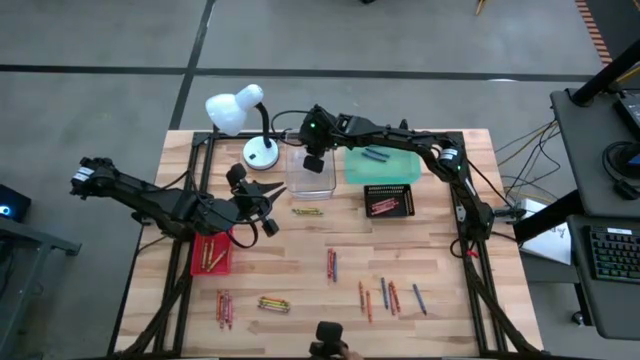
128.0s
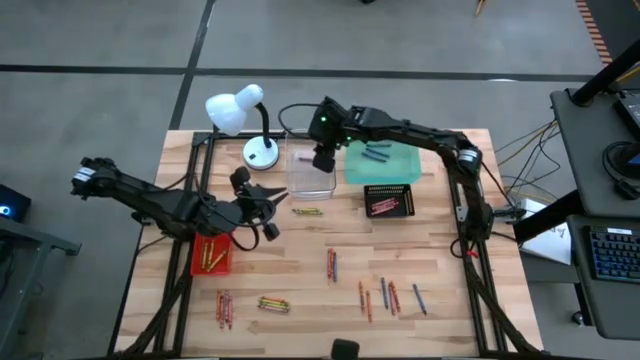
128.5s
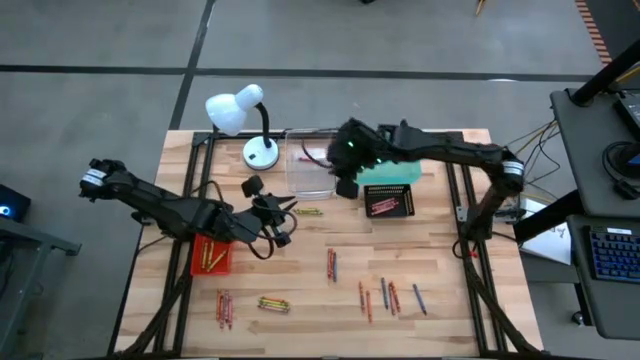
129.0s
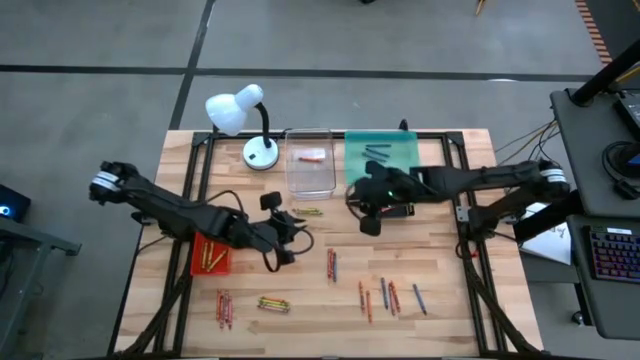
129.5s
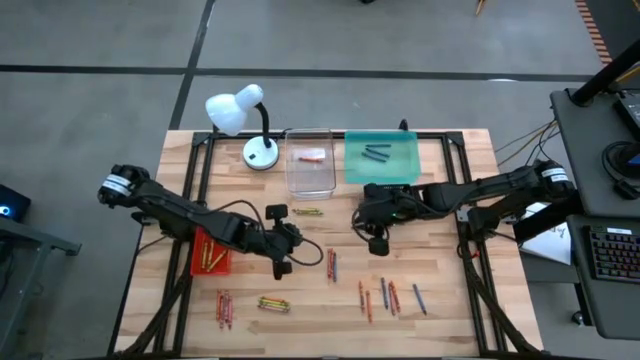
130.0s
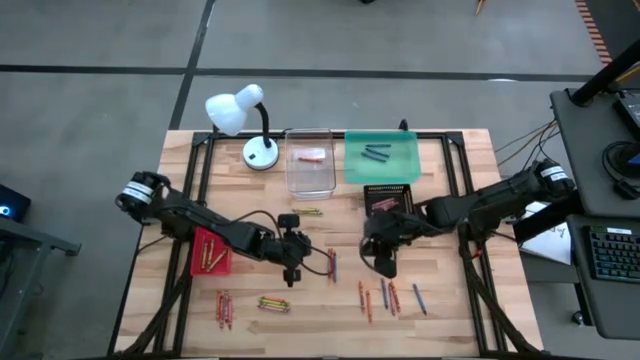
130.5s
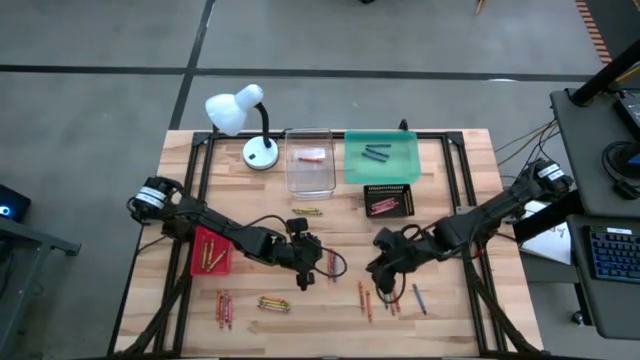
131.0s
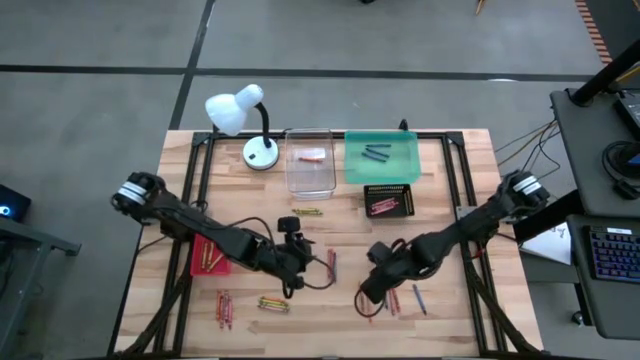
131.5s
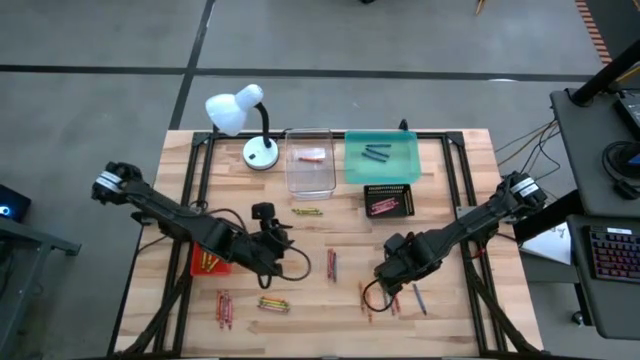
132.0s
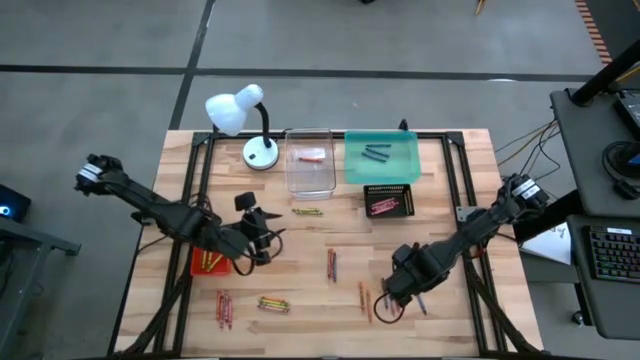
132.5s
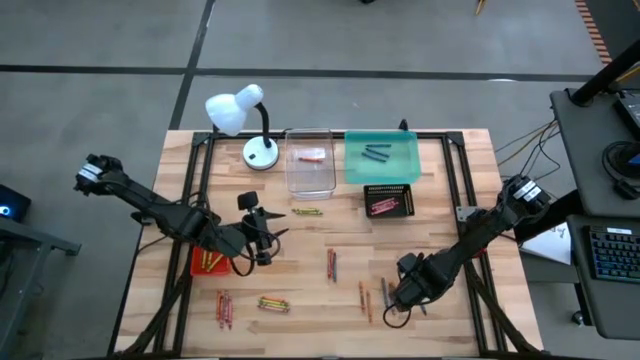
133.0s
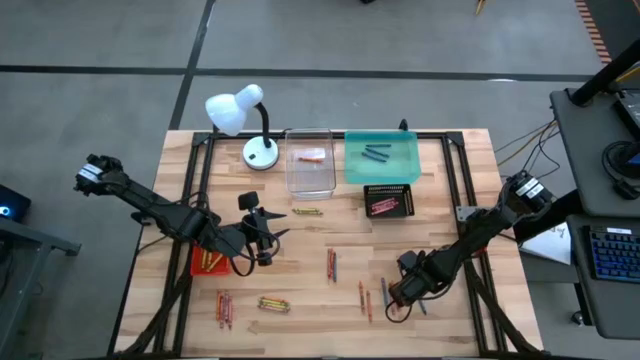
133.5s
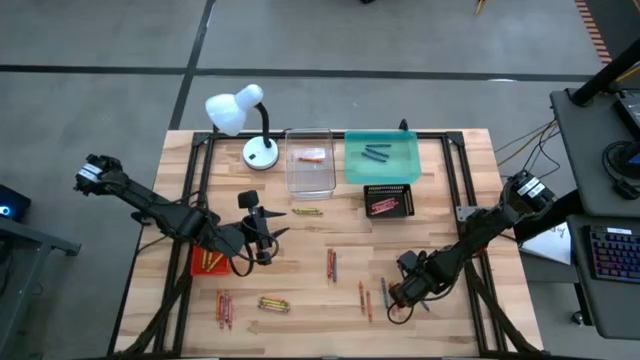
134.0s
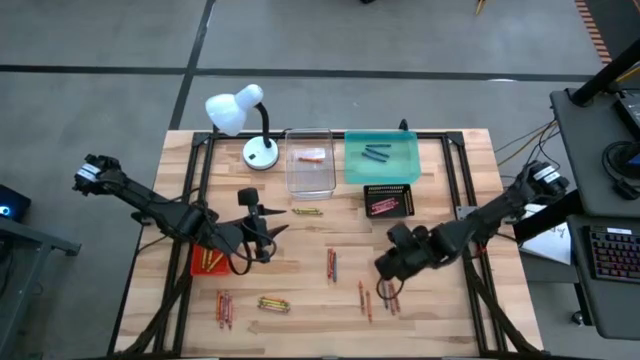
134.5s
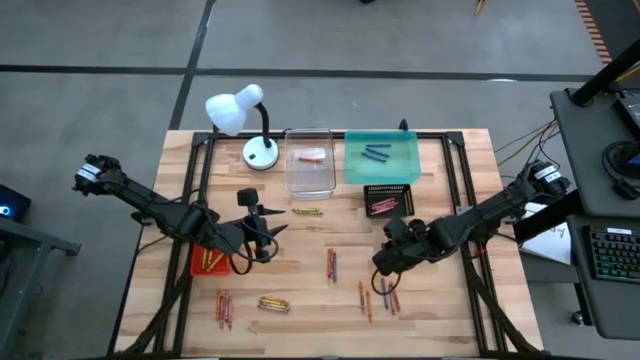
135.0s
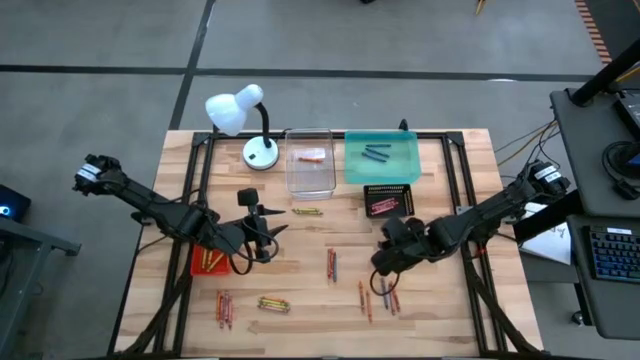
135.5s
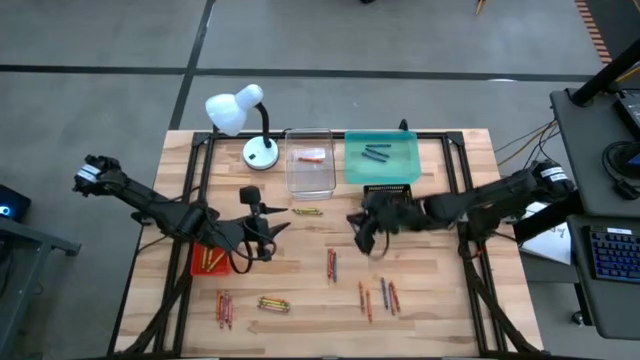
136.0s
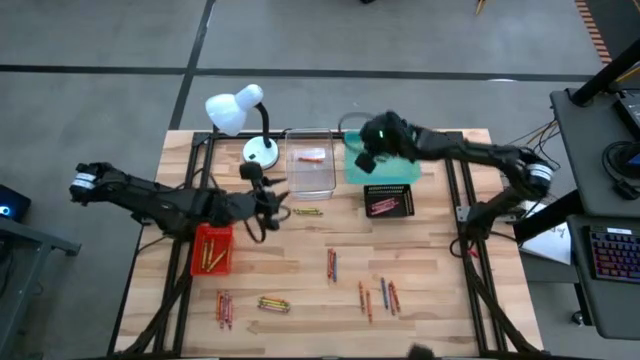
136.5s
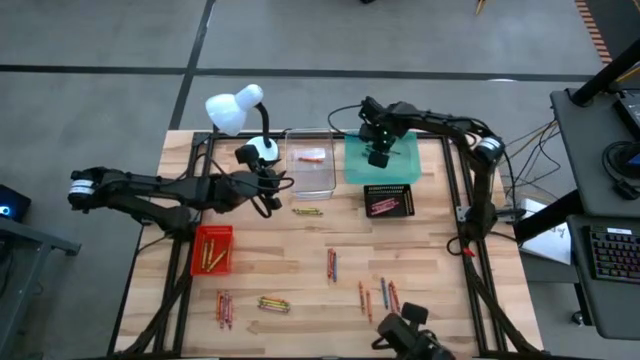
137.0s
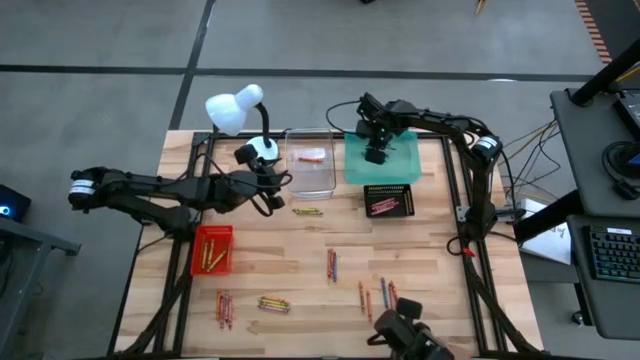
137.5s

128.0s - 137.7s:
Task: Sort crayons
Put the blue crayon into the blue bin

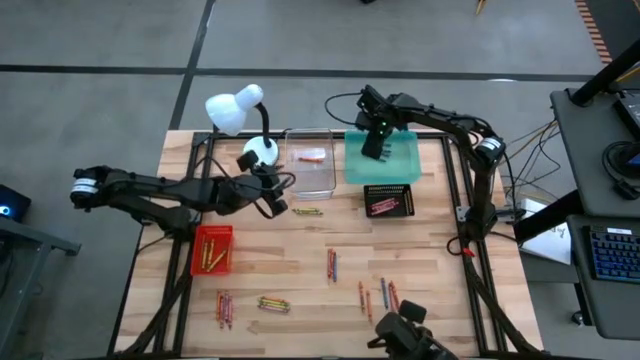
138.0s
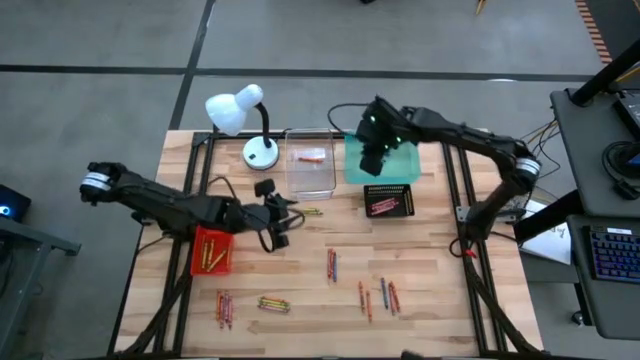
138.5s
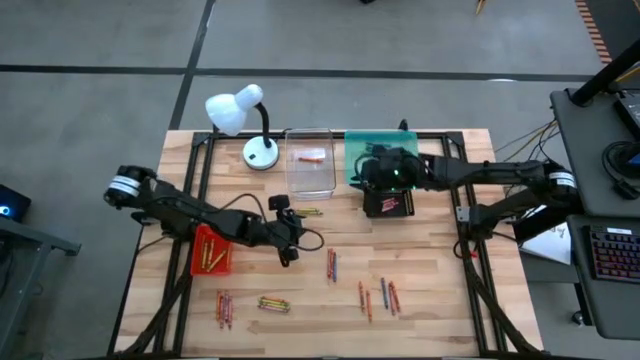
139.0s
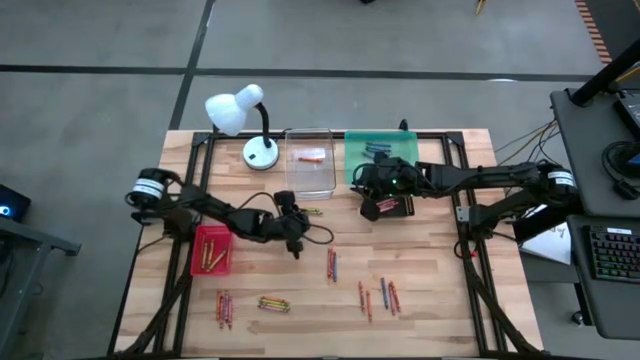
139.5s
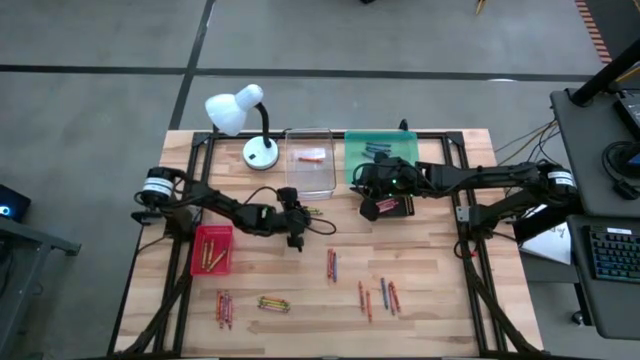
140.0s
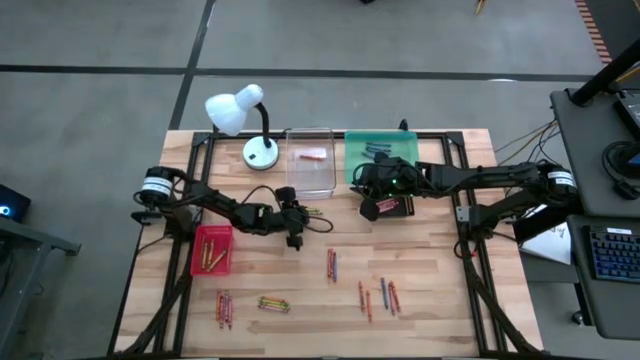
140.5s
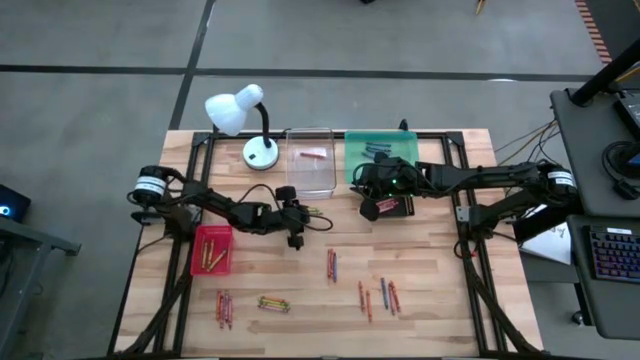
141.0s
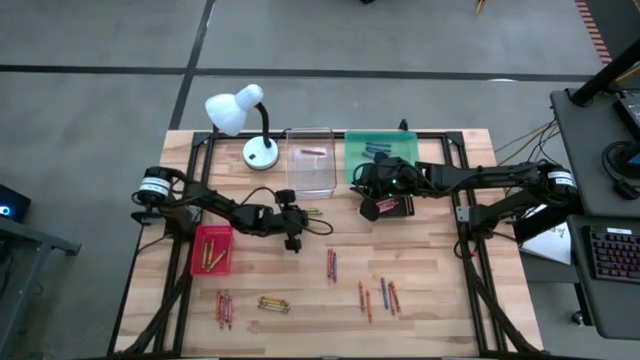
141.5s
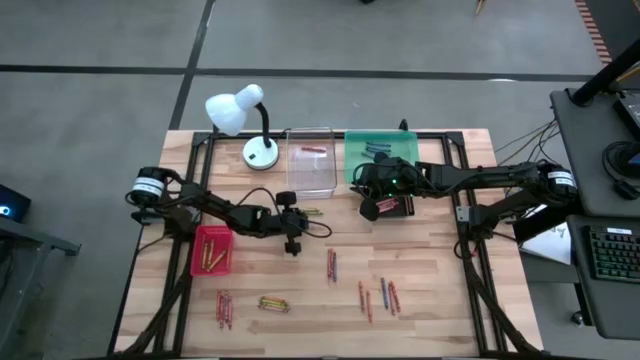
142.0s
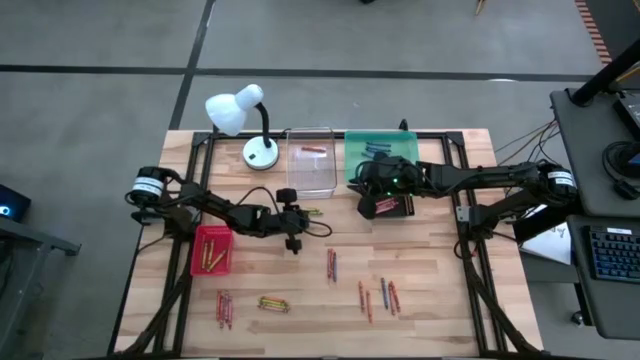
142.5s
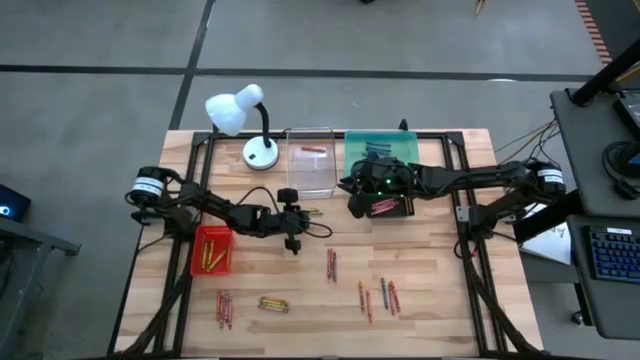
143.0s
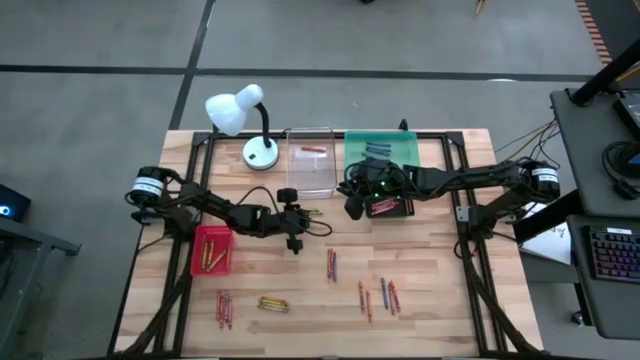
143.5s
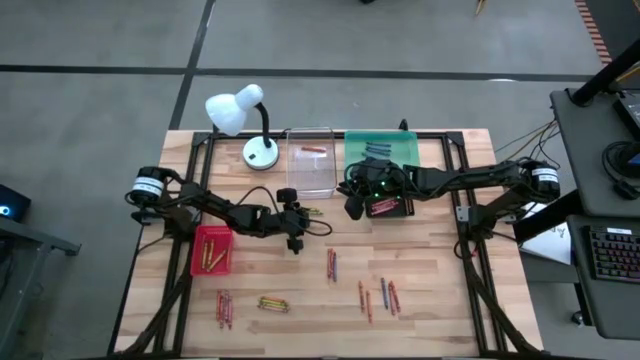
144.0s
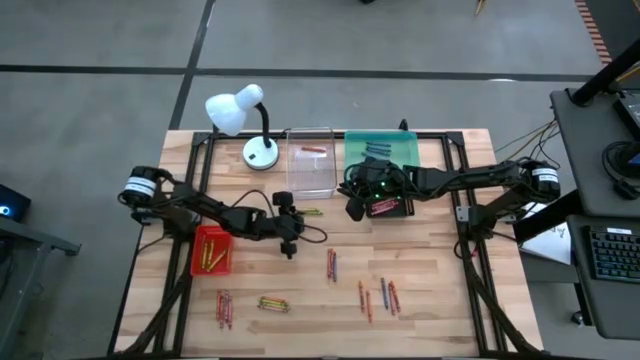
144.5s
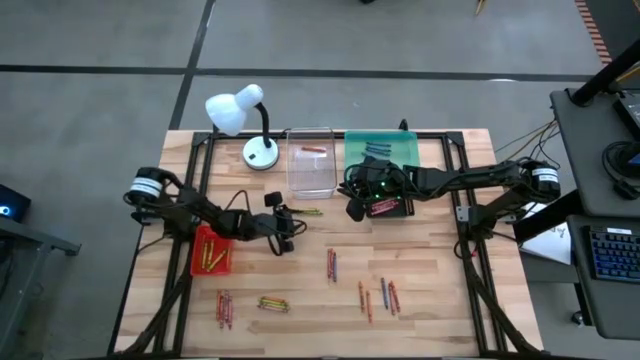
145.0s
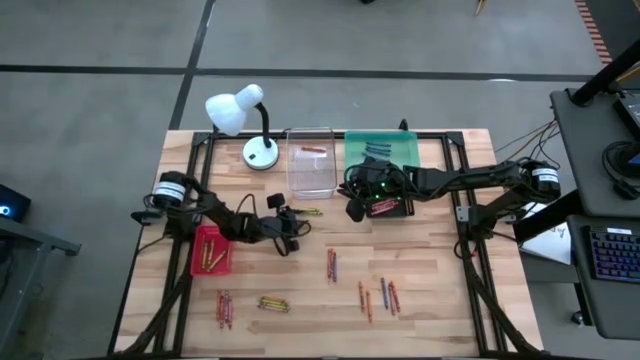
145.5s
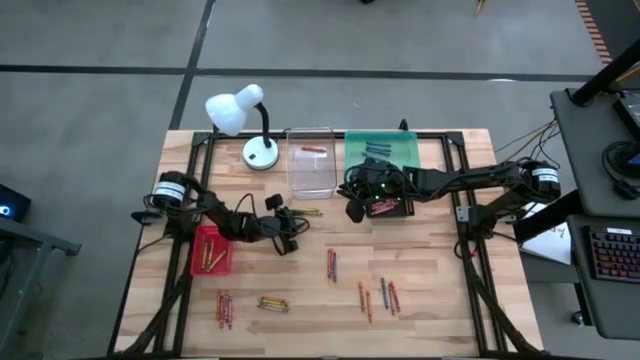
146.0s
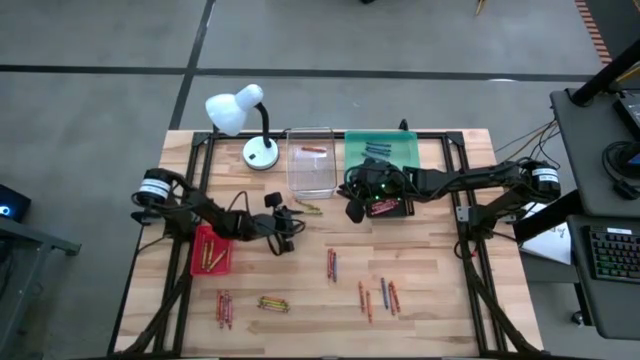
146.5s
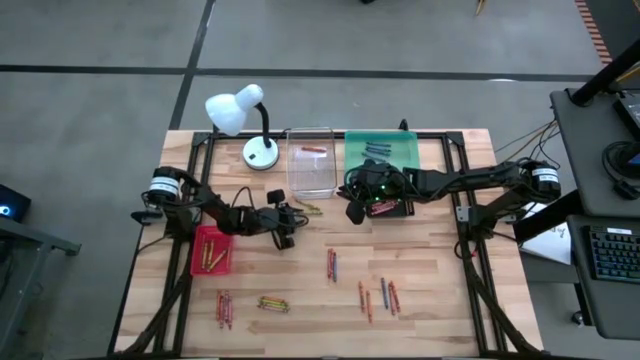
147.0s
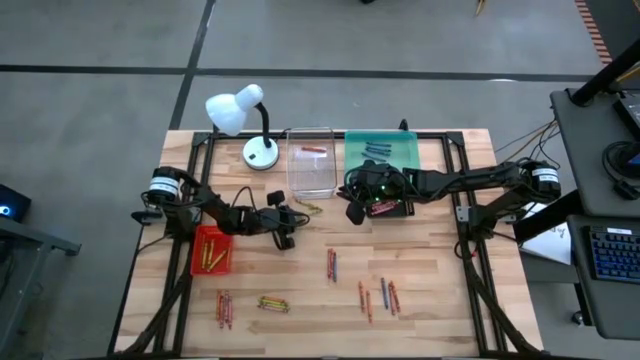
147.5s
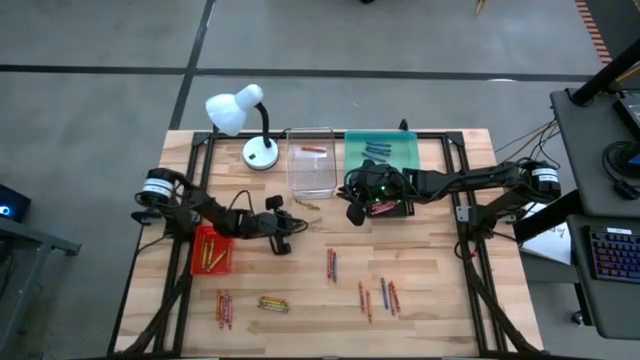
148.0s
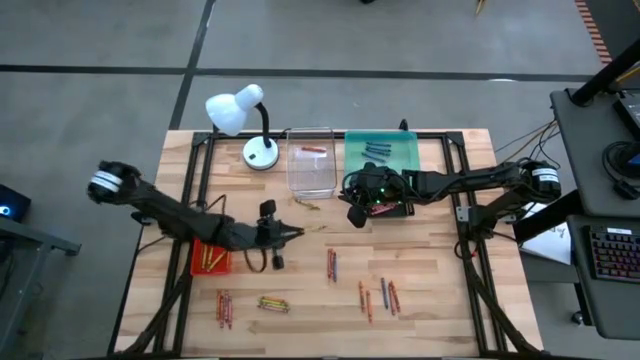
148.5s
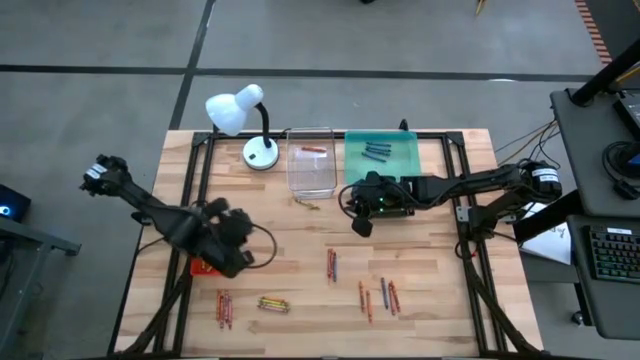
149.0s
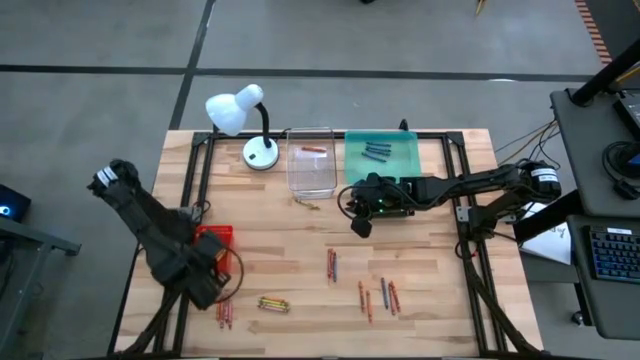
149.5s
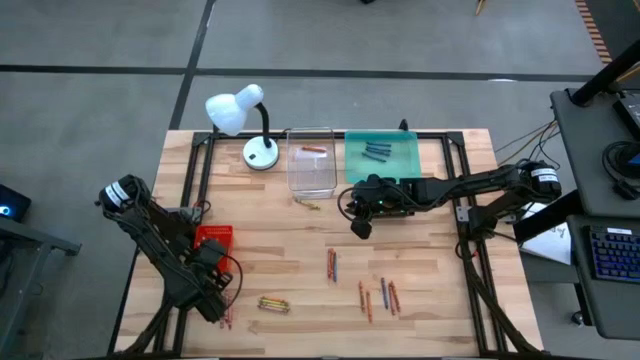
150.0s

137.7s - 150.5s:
Put the green crayon into the orange bin
